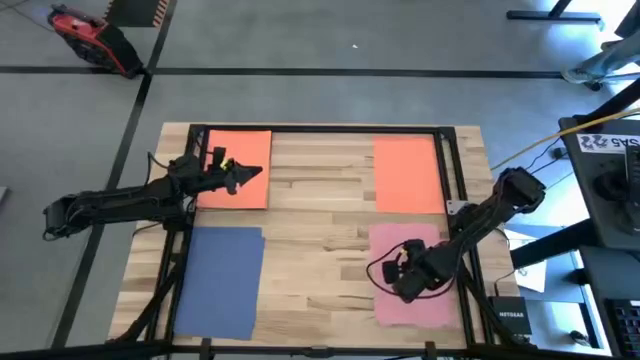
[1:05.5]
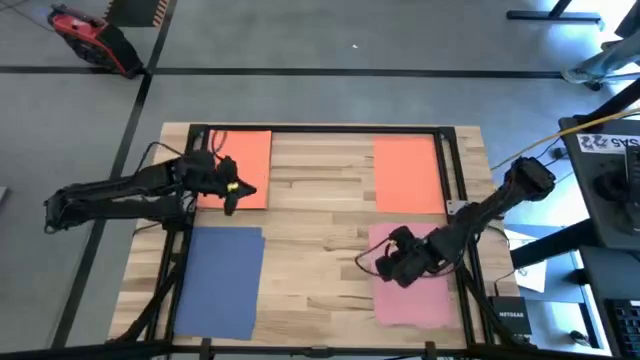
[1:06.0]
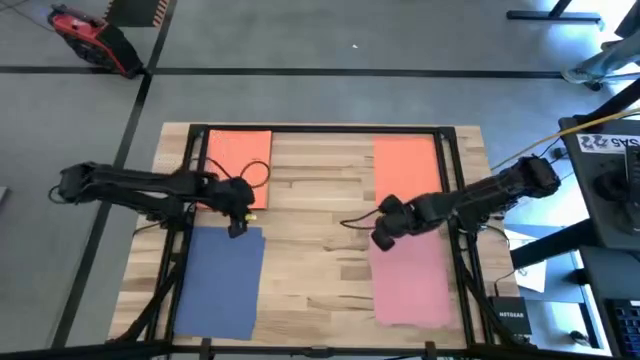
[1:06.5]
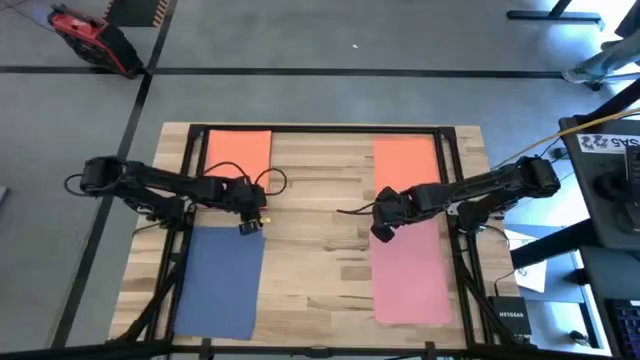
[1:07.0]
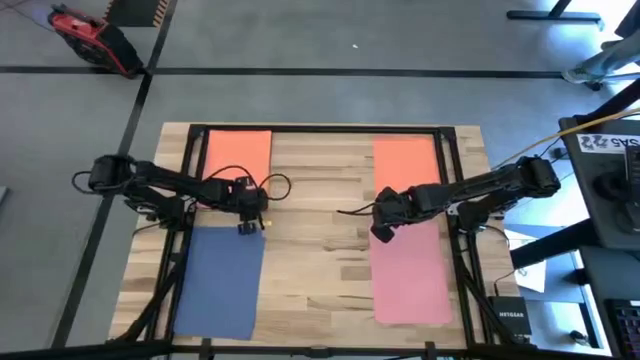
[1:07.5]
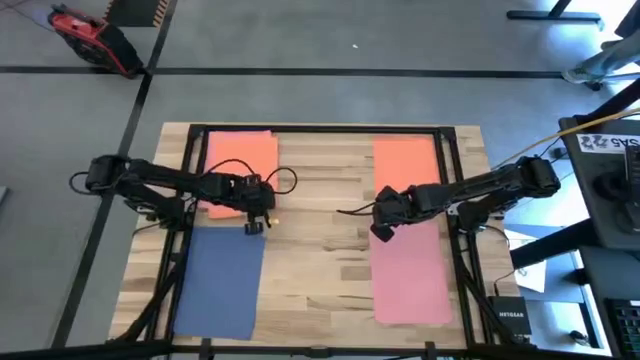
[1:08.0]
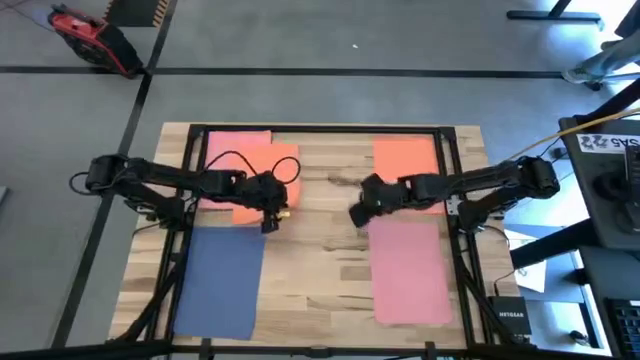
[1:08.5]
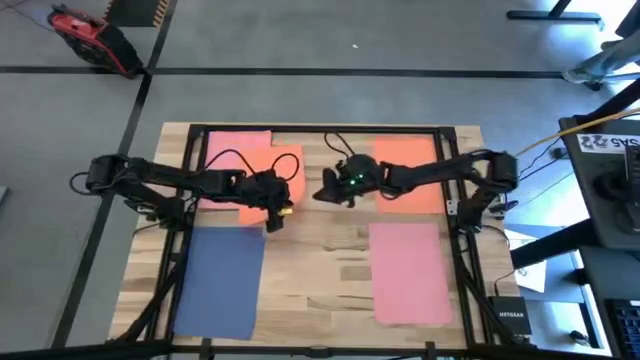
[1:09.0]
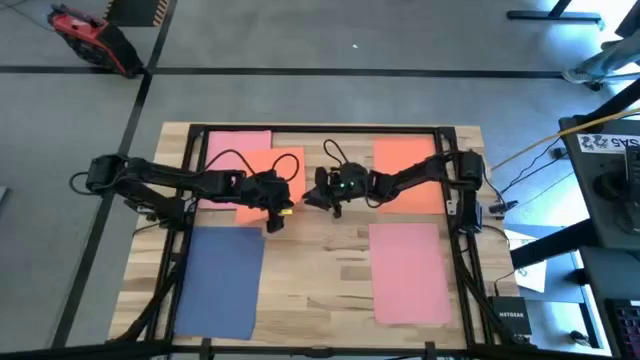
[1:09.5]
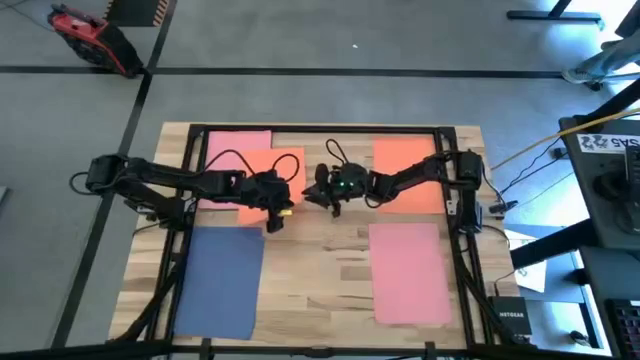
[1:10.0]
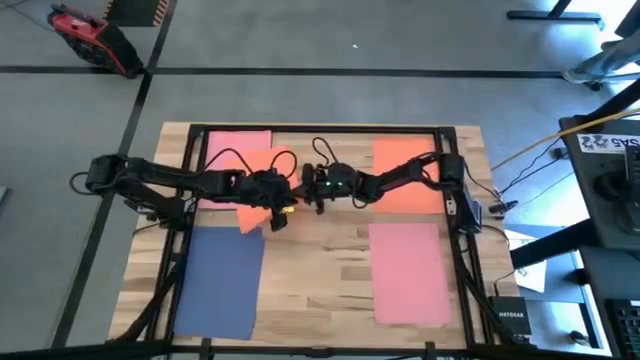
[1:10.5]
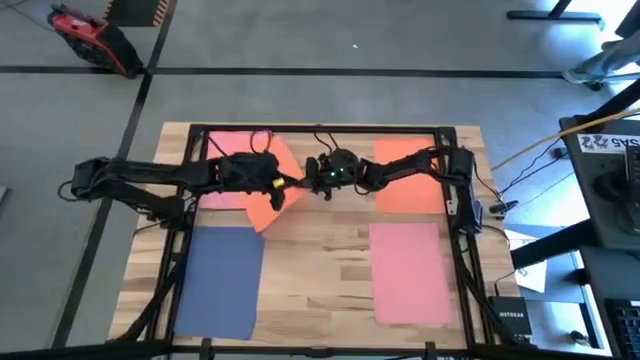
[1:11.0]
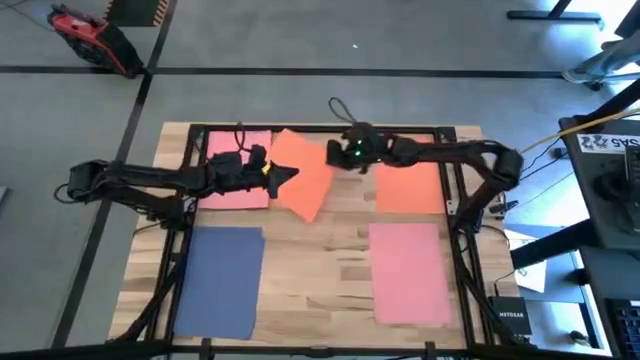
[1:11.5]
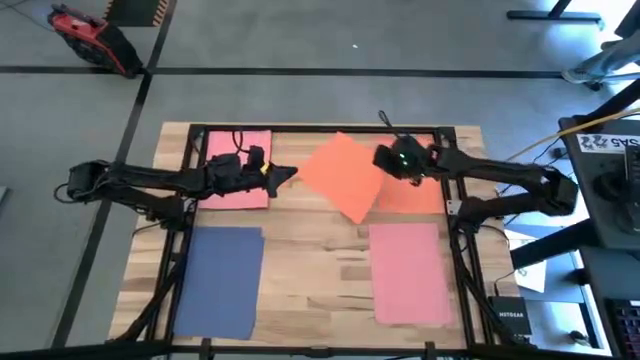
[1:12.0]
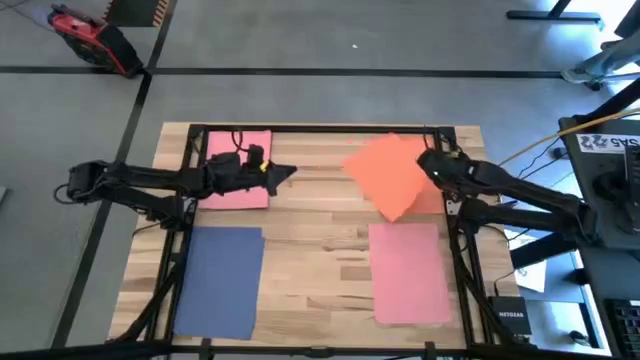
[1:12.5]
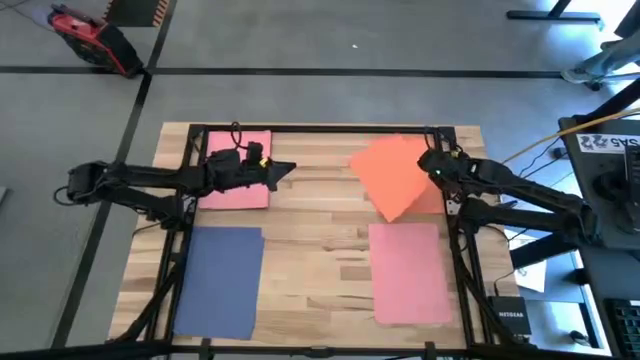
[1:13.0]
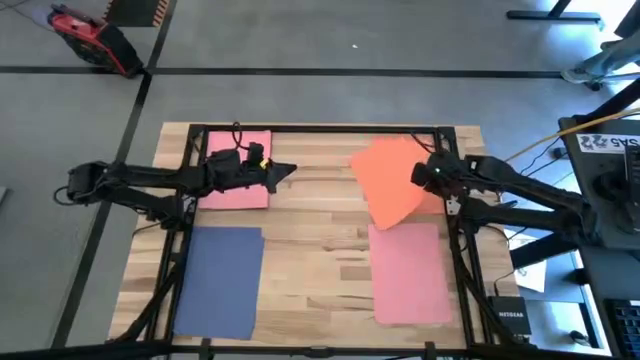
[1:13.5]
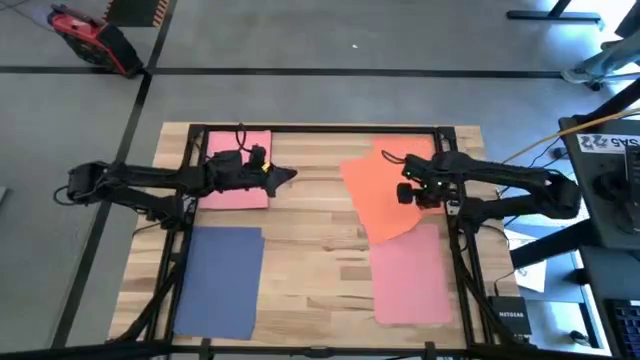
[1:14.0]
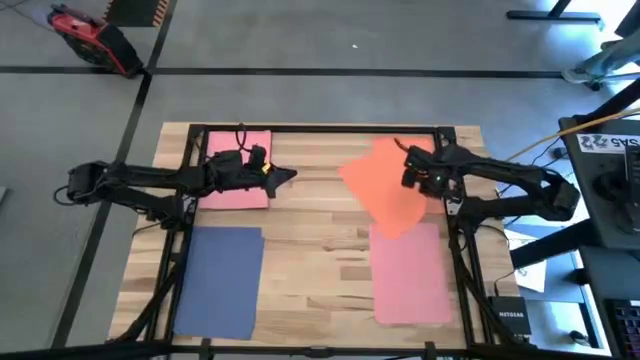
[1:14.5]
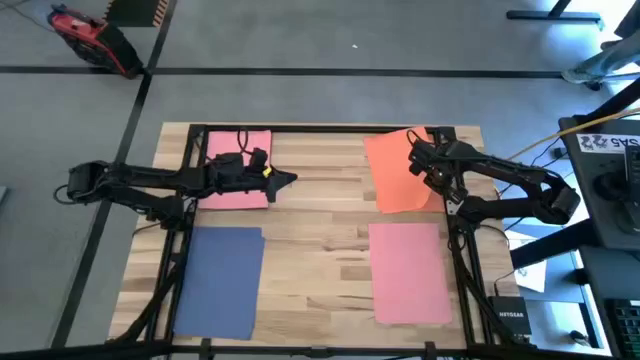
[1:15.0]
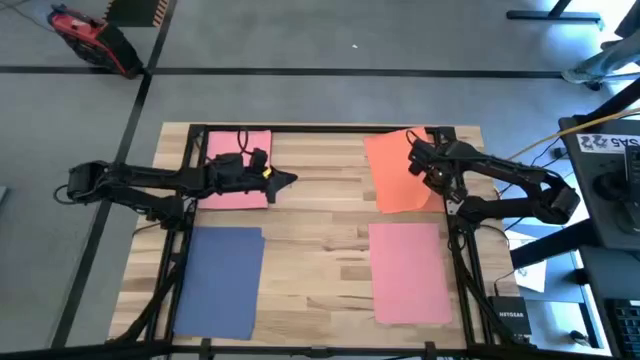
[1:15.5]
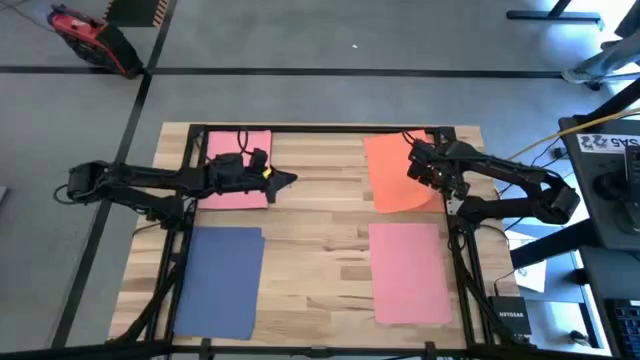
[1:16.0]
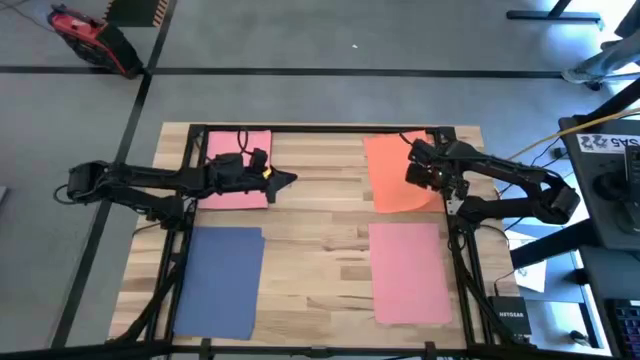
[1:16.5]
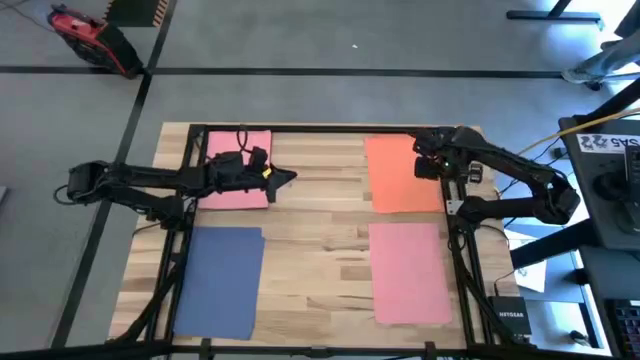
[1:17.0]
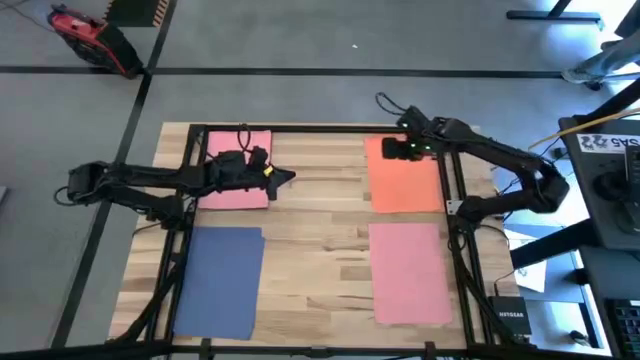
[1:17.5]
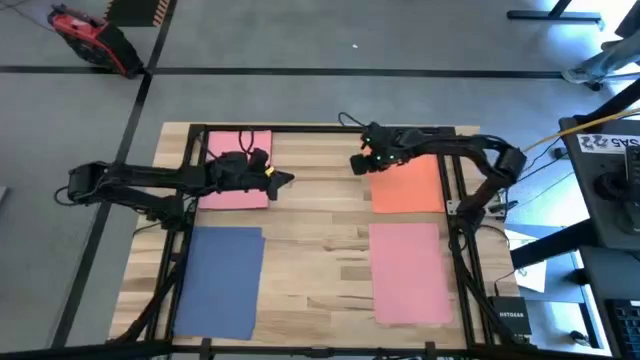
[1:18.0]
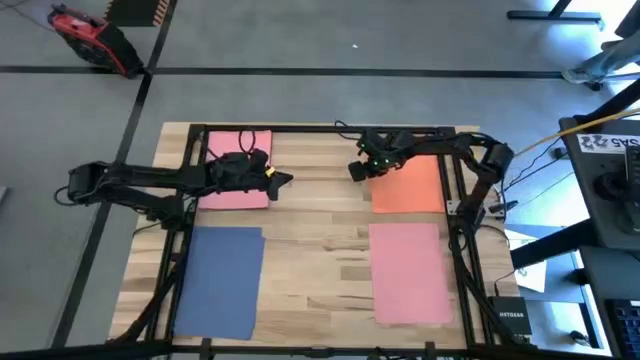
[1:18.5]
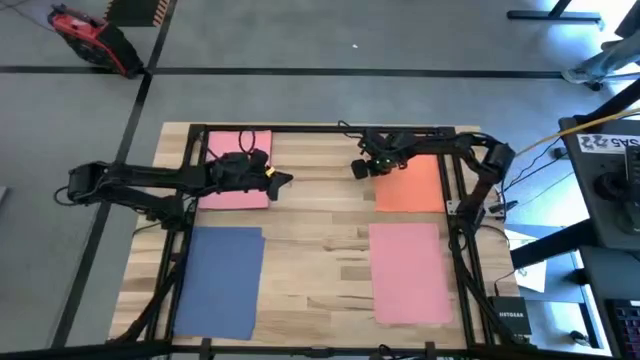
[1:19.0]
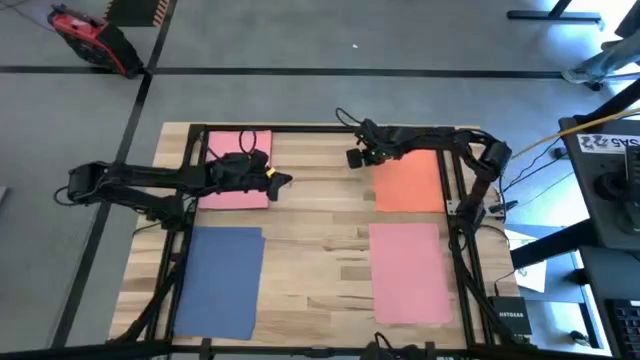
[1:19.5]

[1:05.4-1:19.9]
Task: Organize paper
Stack the orange colored paper on top of the orange colored paper

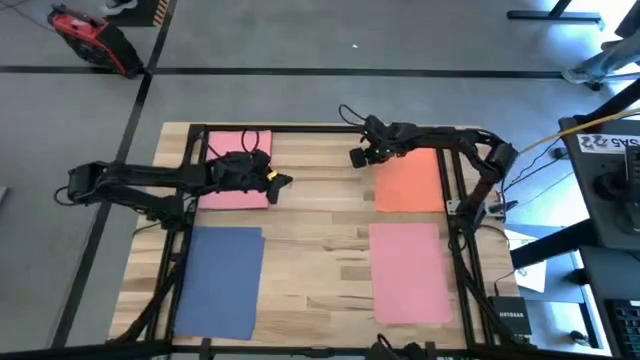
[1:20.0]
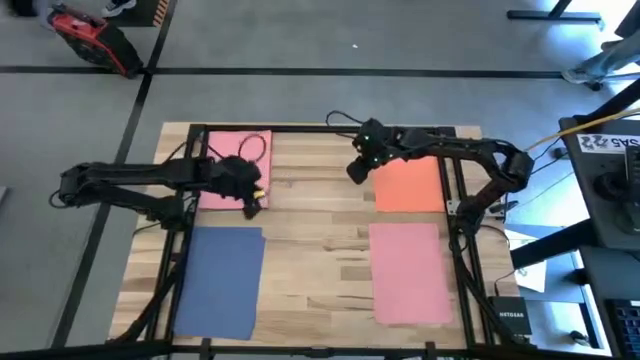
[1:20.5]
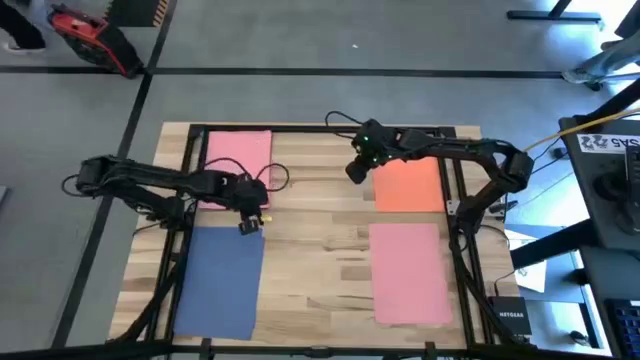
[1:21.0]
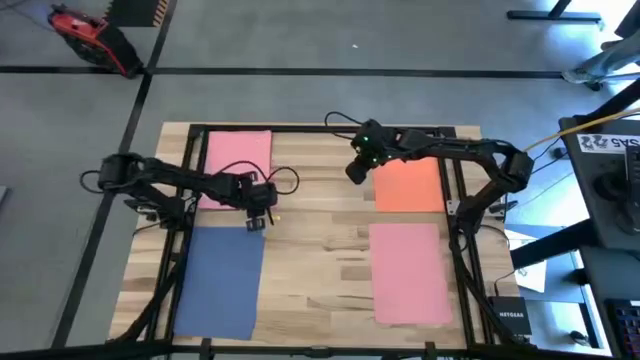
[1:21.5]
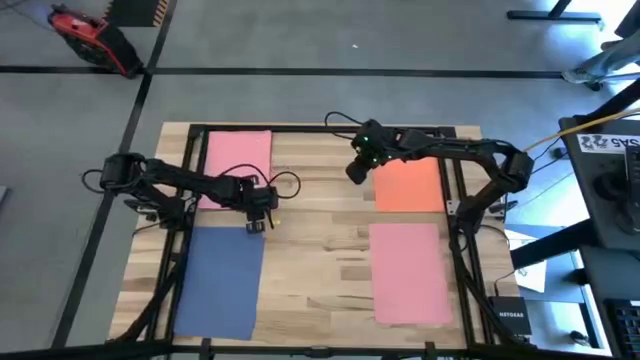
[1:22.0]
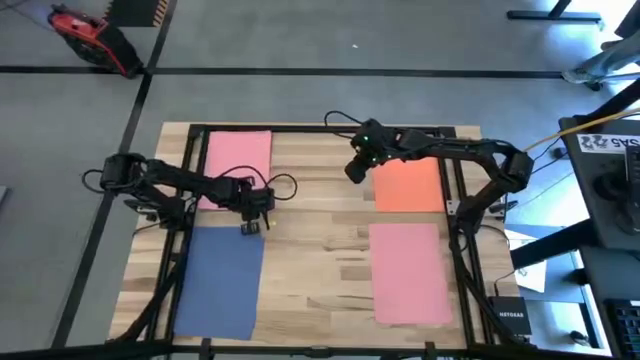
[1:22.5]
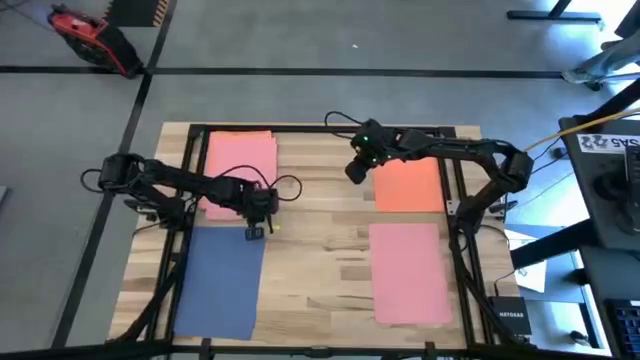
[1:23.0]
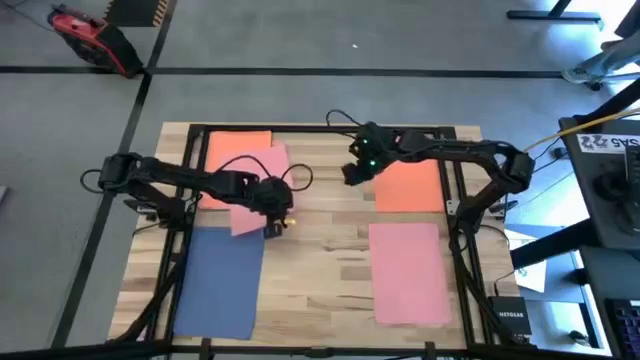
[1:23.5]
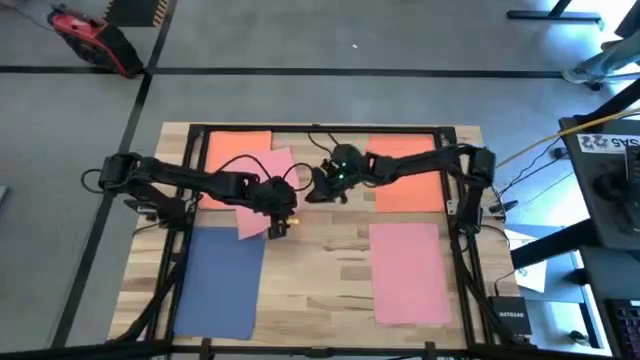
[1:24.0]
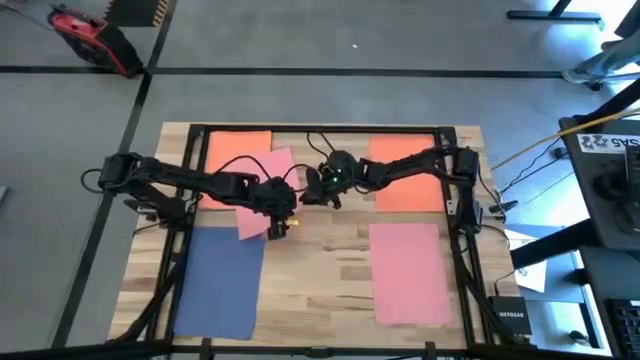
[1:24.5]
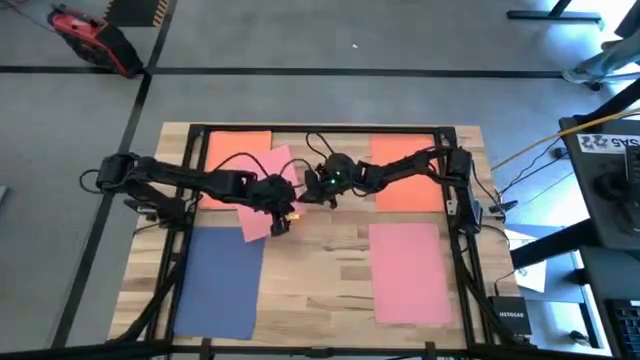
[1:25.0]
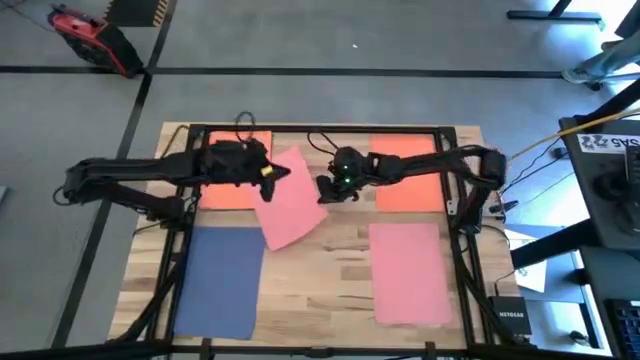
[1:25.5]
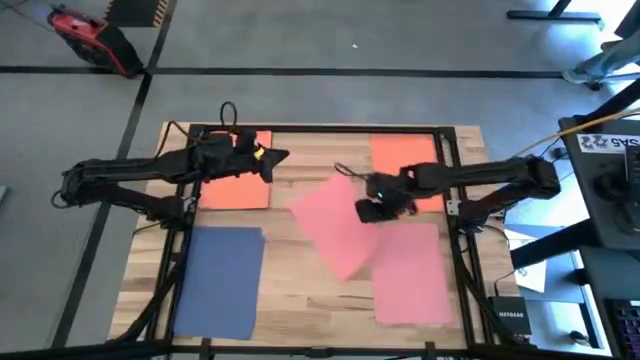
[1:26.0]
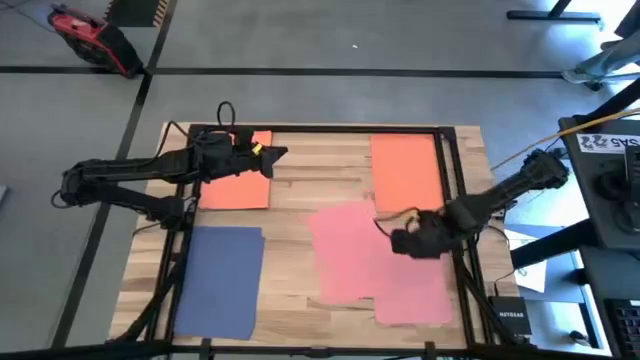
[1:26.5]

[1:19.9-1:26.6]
Stack the pink colored paper on top of the pink colored paper
